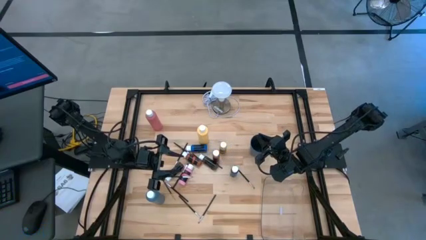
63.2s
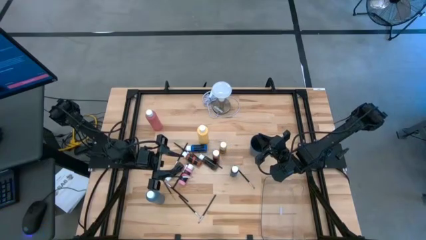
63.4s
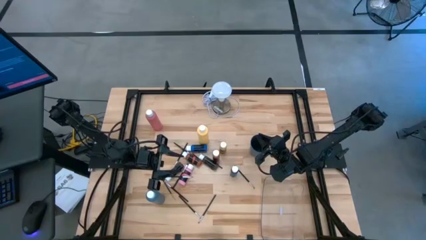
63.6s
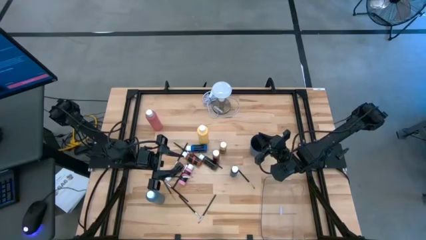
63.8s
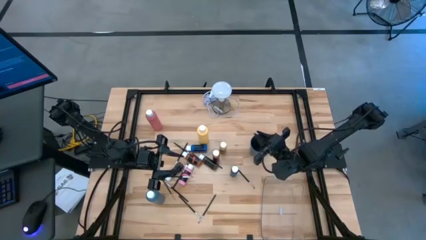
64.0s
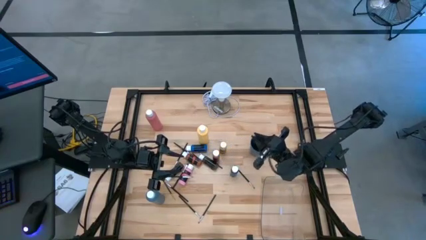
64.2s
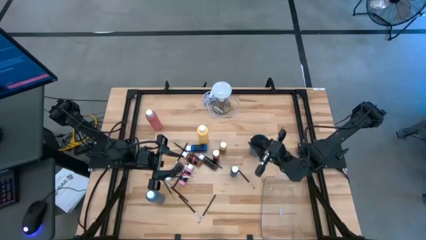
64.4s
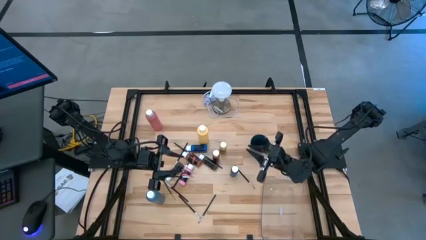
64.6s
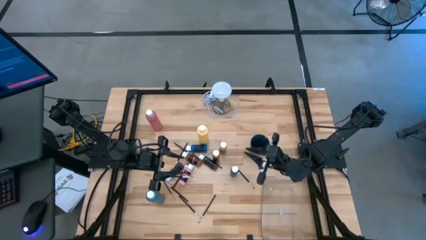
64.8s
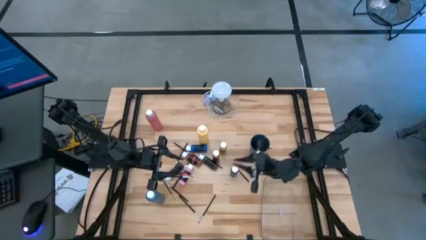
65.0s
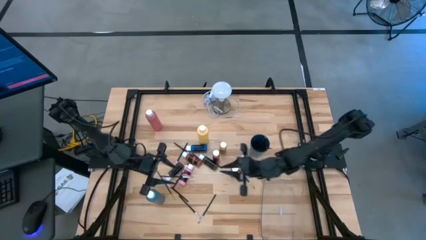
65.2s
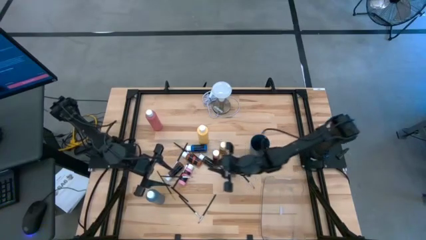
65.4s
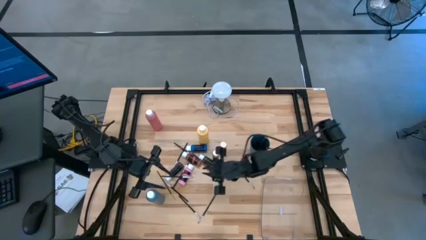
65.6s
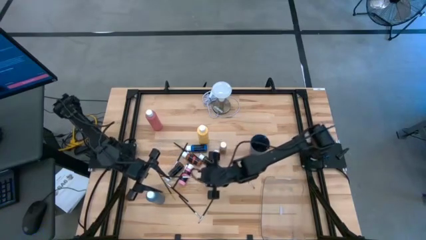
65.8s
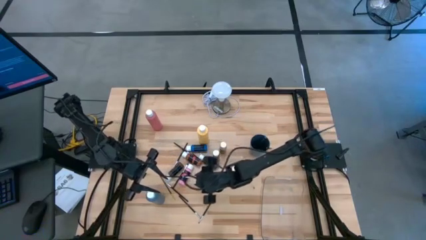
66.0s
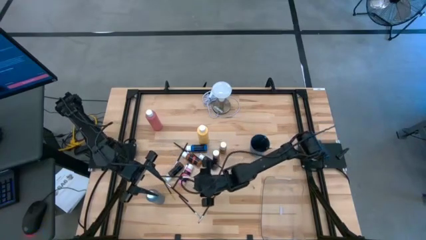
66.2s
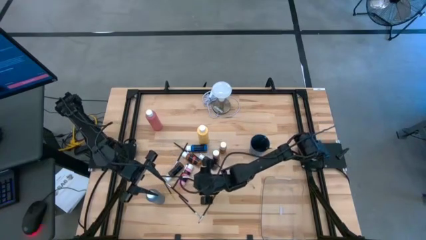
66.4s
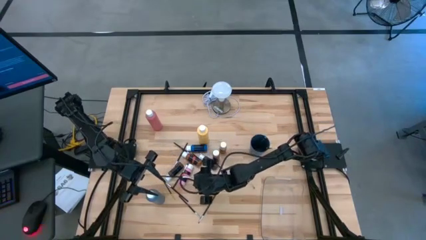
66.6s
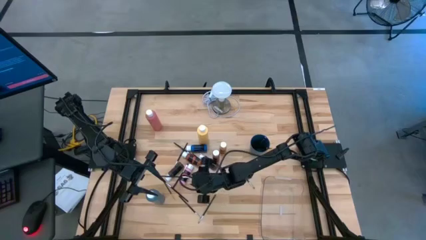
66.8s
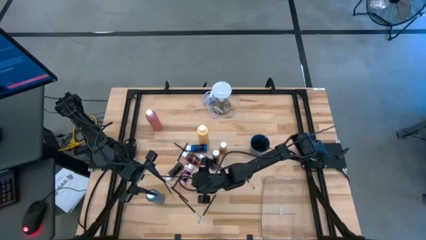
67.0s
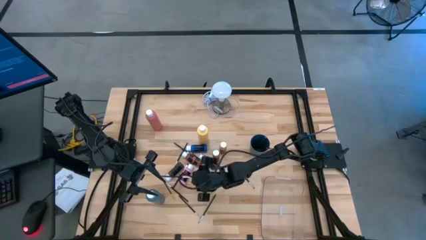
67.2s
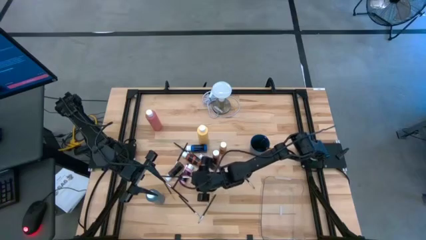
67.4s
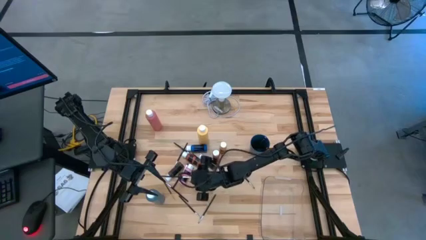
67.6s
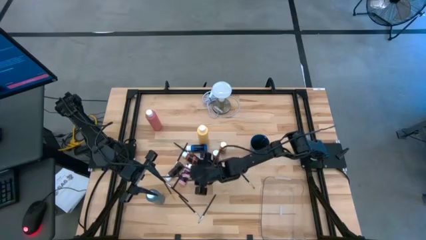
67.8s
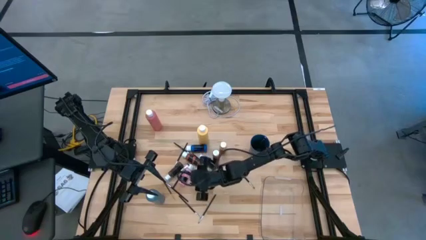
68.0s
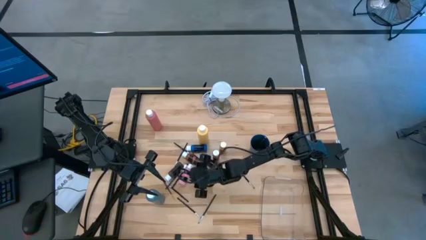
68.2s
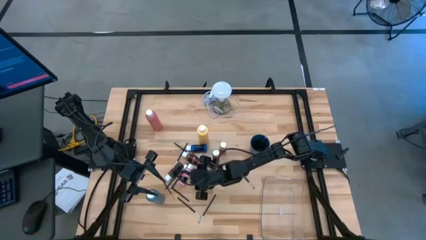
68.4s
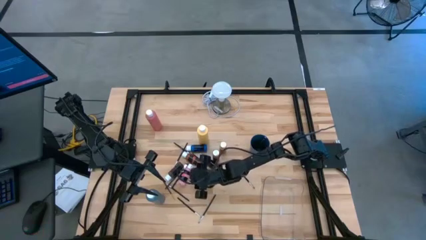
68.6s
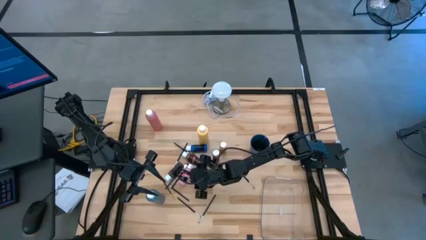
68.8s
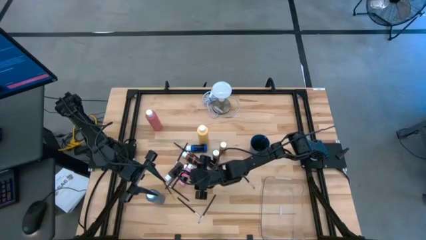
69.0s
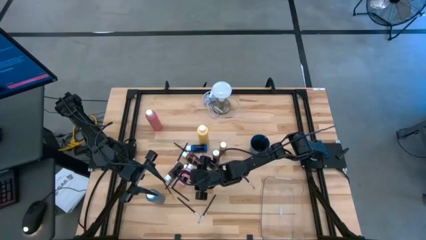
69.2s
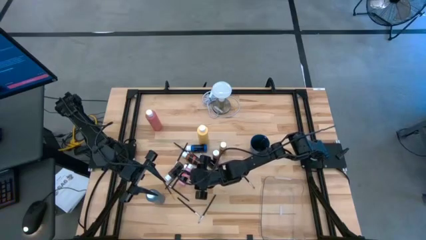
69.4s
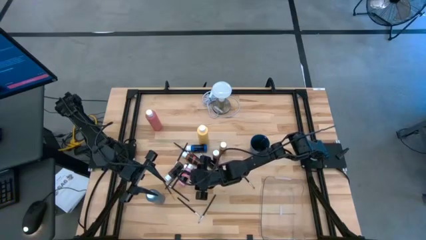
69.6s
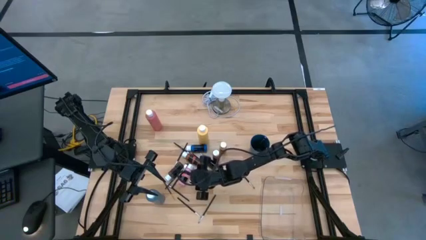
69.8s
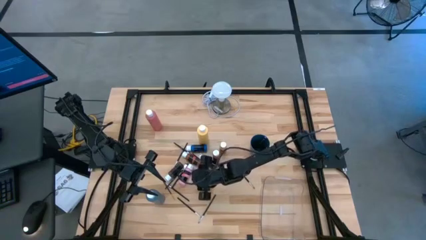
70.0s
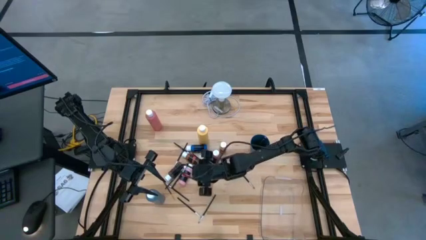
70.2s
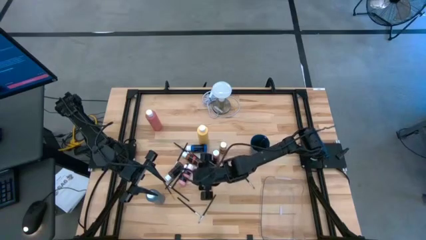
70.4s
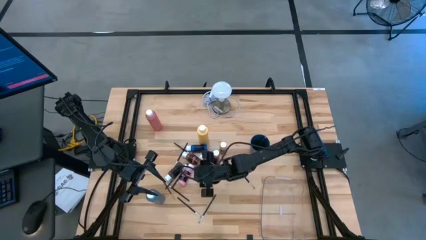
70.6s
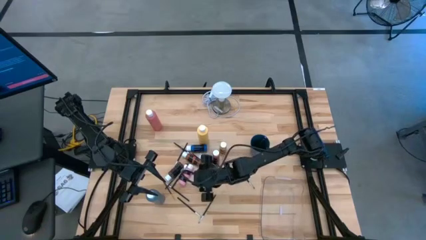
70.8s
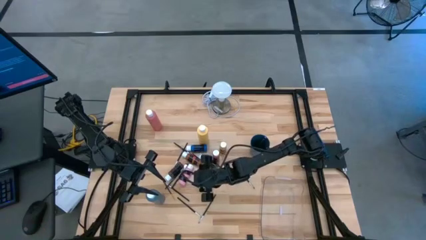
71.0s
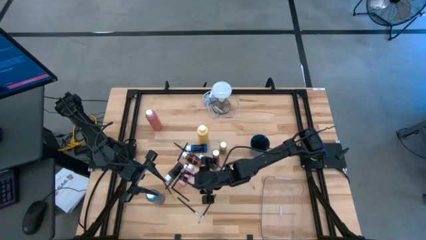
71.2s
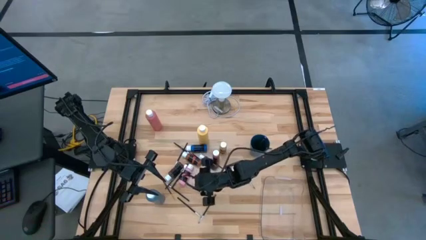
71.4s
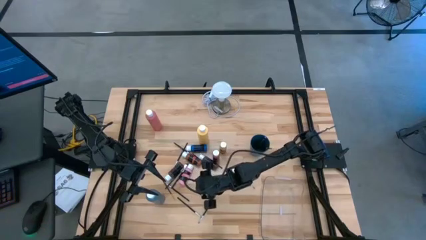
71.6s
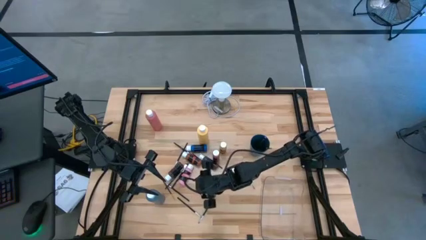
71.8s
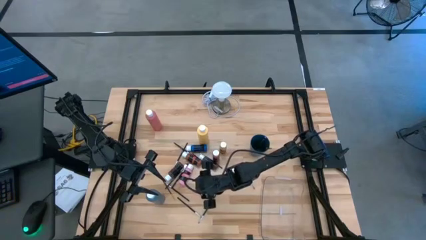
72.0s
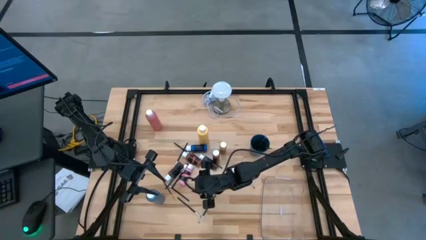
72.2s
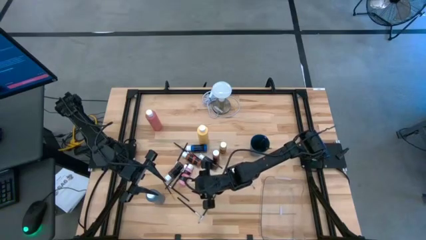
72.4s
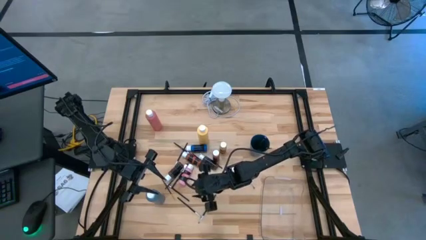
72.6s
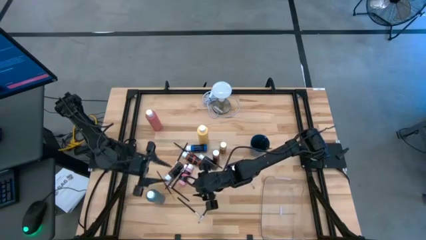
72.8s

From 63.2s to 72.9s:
Task: Pick & Place Paint Supplies
Put the black silver paintbrush into the blue cup

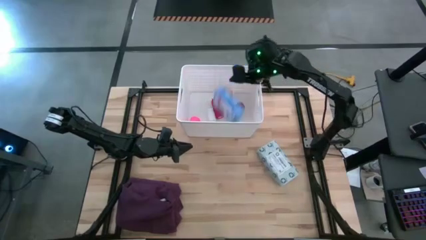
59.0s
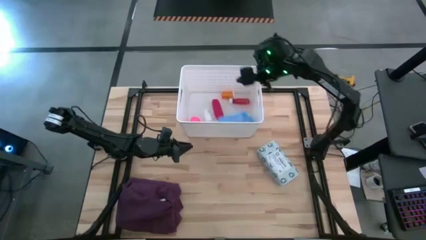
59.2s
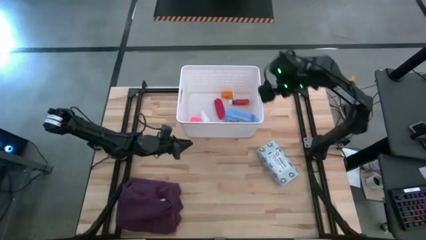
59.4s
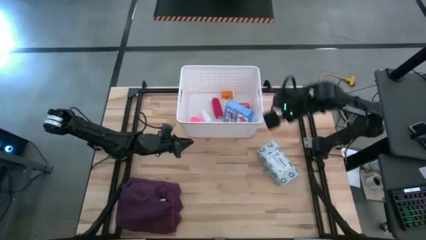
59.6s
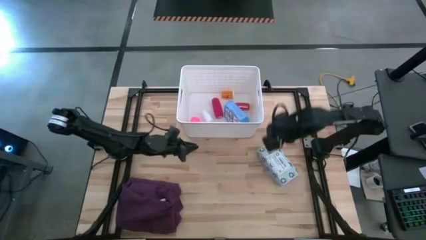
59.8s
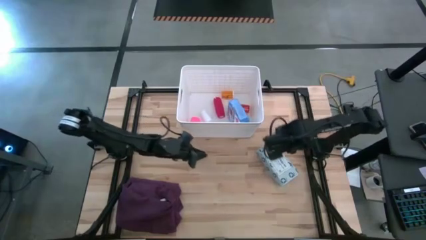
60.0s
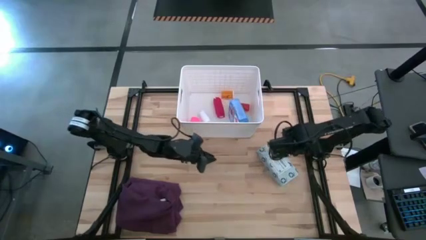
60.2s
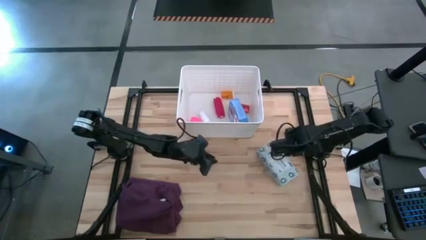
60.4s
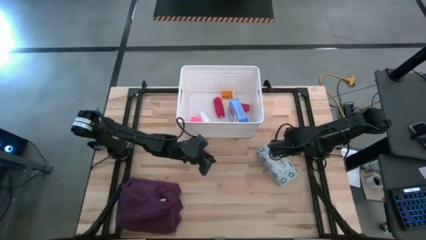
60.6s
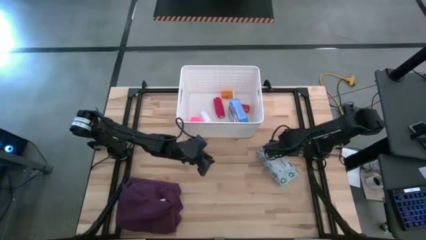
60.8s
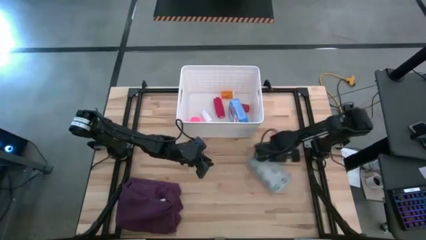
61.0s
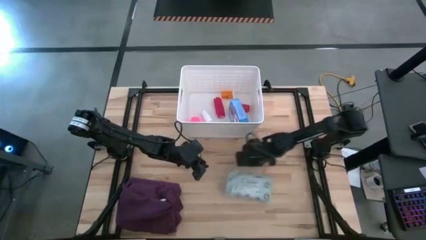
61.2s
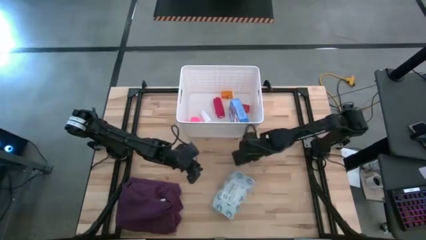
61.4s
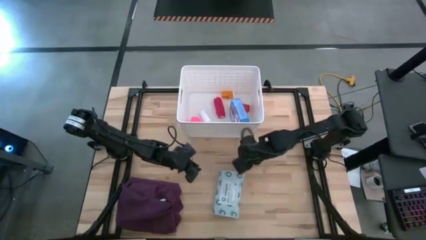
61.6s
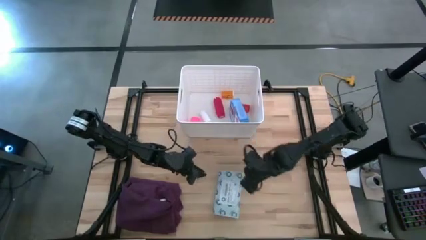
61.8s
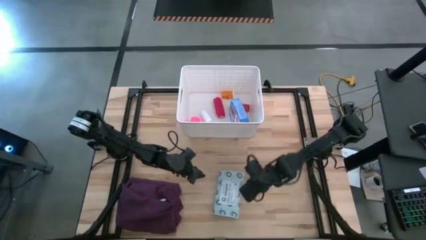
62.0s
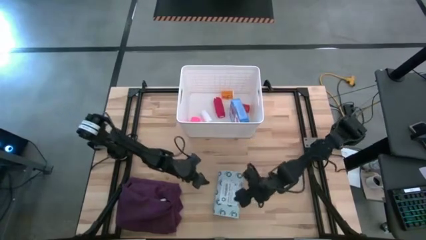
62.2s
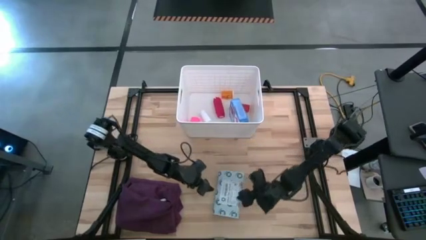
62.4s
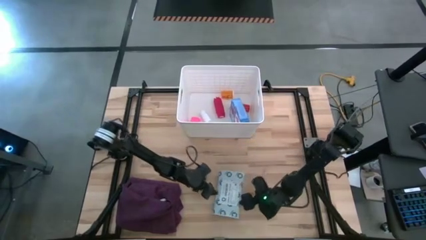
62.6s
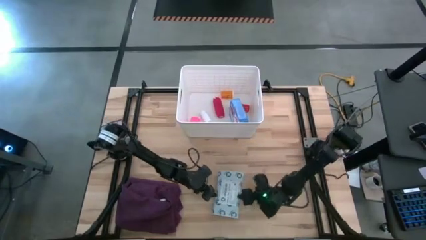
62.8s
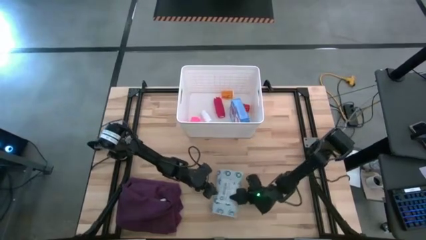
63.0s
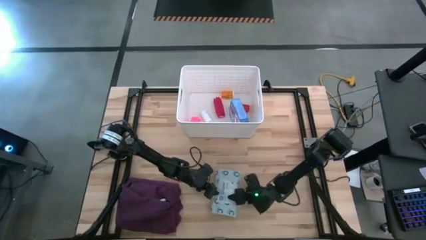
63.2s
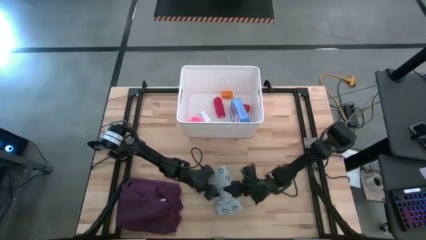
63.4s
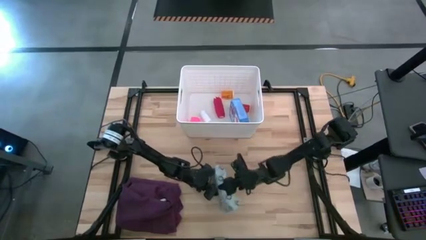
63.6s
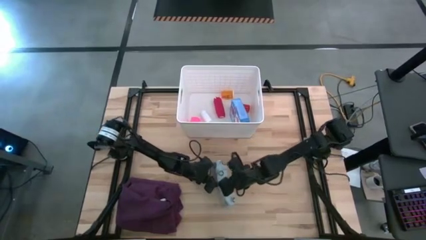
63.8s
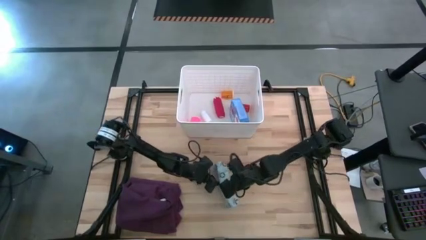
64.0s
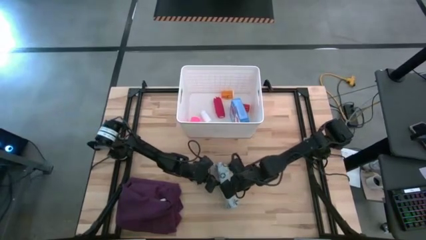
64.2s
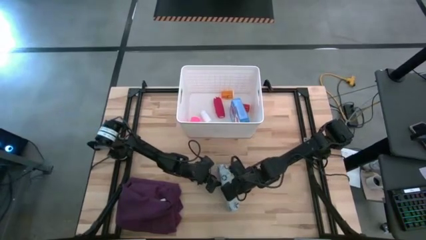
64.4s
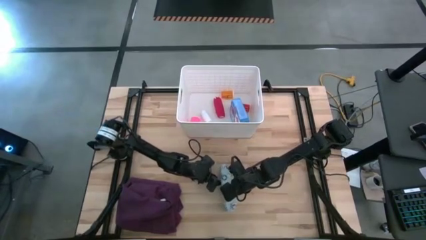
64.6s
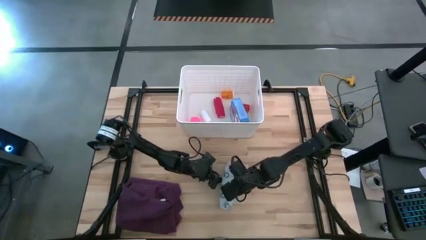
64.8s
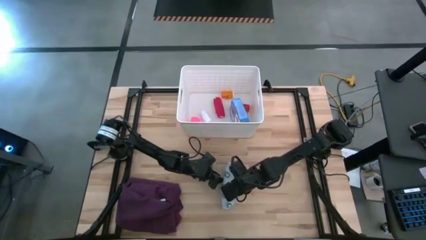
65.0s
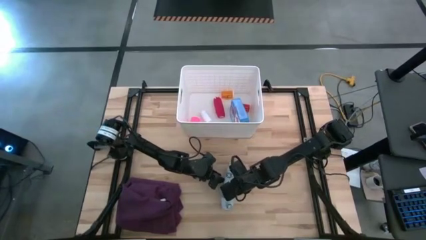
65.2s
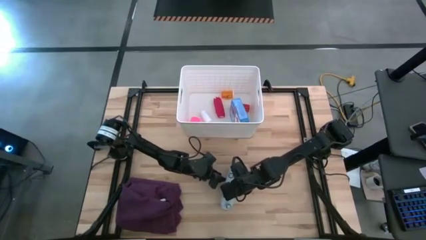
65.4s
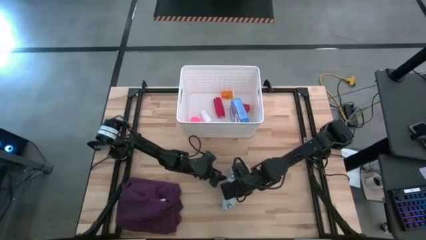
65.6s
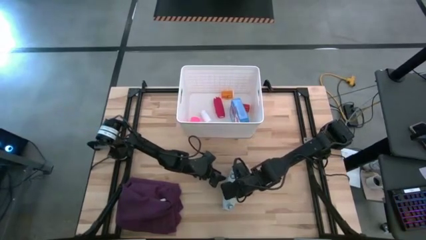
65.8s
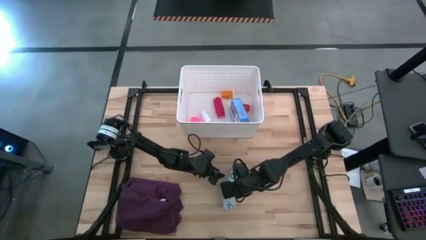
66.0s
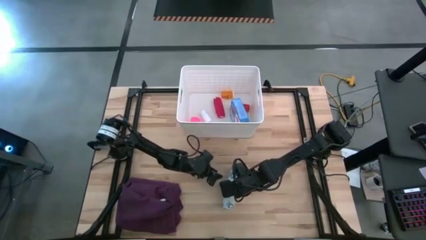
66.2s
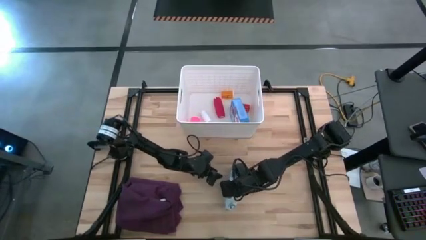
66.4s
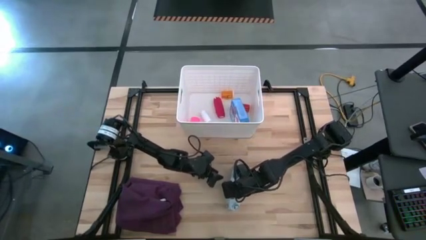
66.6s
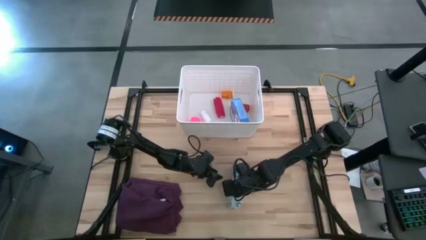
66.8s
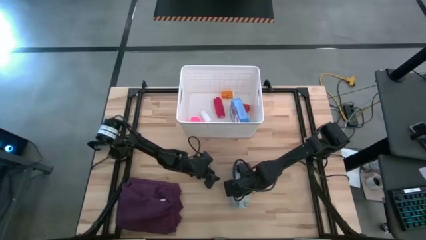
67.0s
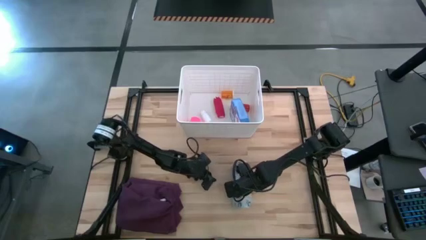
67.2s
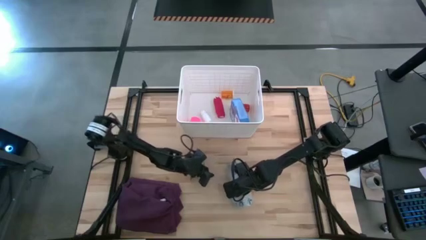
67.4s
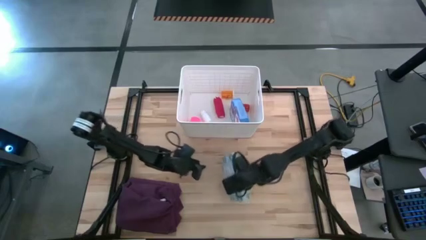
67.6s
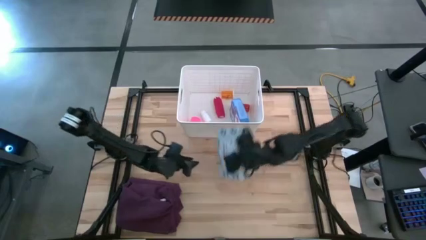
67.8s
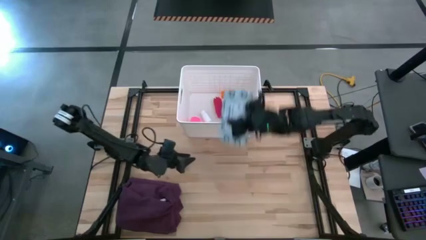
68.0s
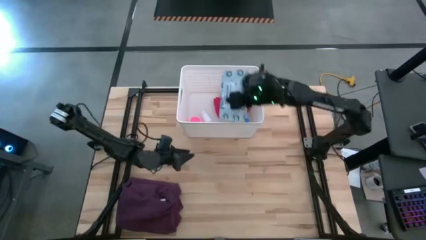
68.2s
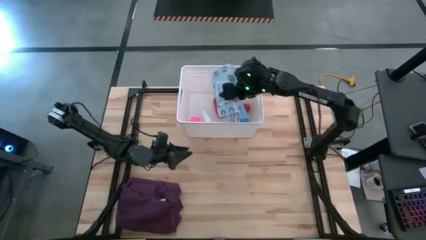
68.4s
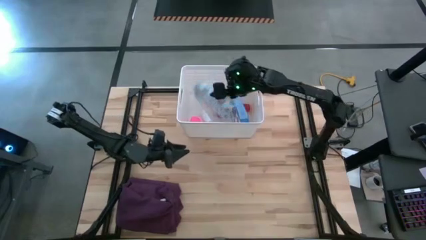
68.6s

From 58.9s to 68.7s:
Task: Pick & place medical supplies in basket/bin
Put the white mailer bag into the white bin
